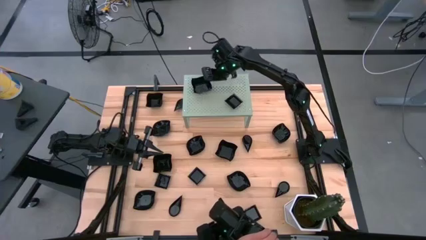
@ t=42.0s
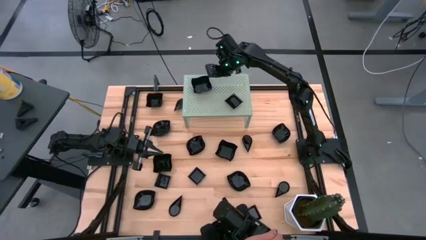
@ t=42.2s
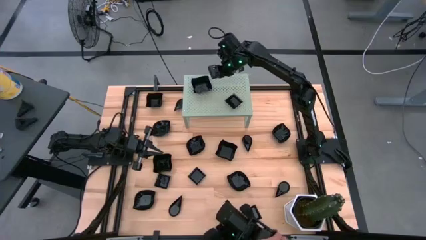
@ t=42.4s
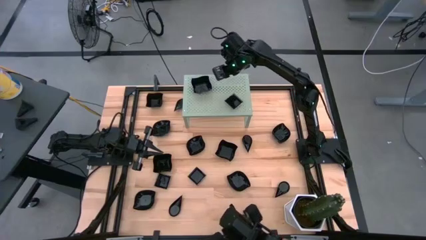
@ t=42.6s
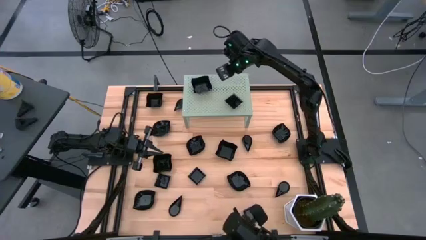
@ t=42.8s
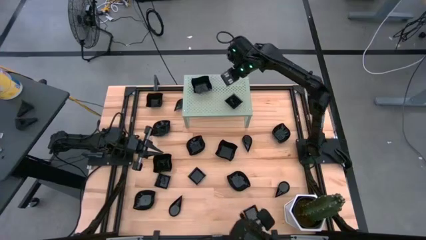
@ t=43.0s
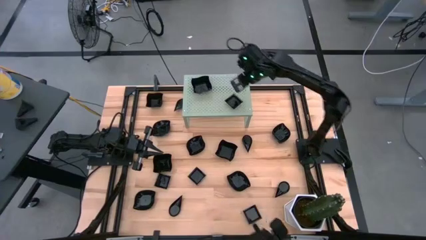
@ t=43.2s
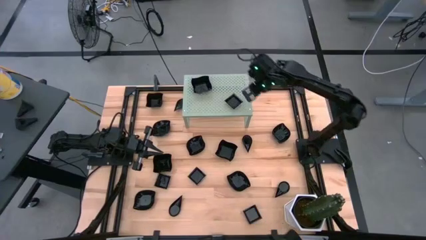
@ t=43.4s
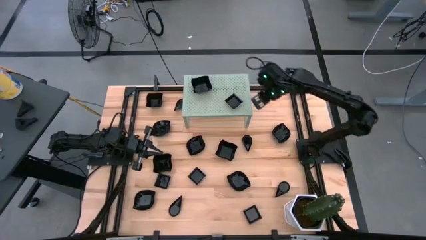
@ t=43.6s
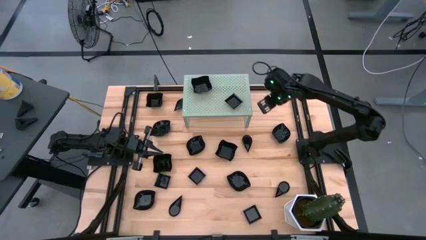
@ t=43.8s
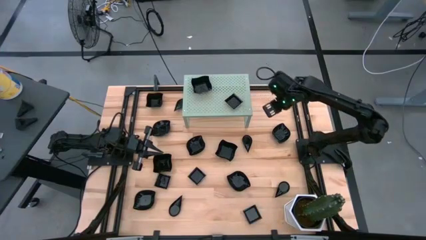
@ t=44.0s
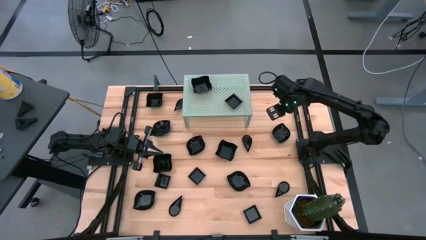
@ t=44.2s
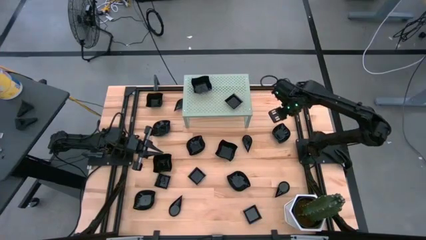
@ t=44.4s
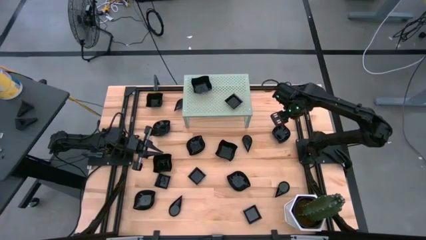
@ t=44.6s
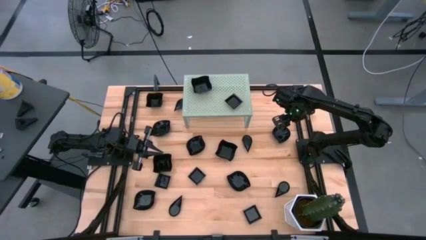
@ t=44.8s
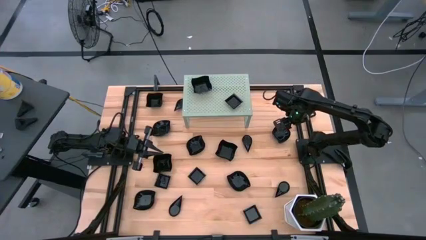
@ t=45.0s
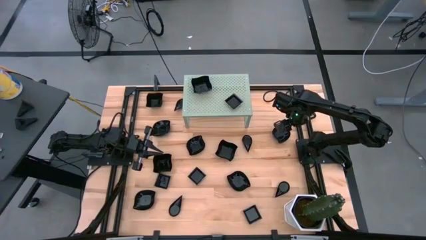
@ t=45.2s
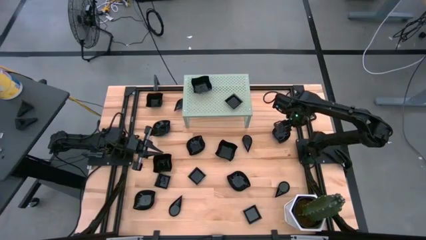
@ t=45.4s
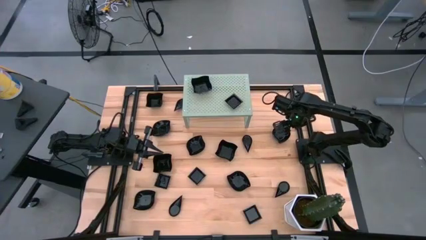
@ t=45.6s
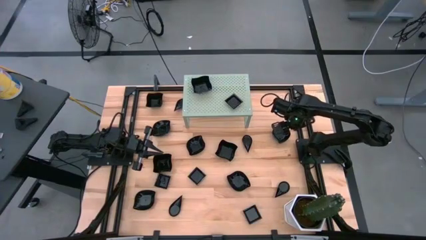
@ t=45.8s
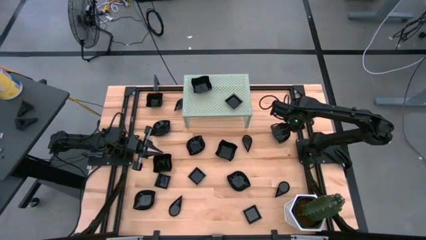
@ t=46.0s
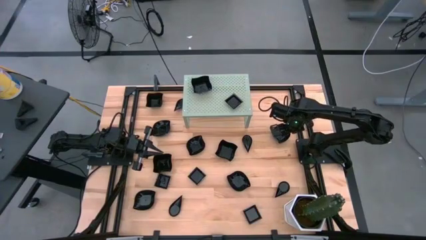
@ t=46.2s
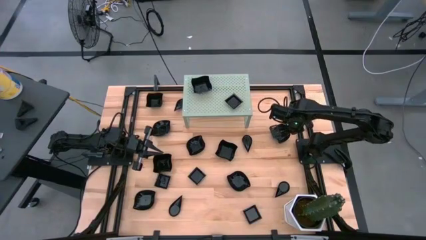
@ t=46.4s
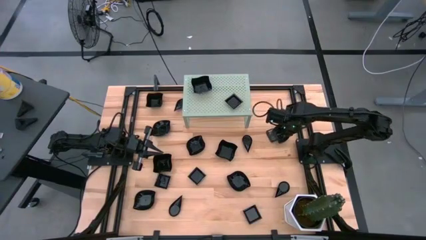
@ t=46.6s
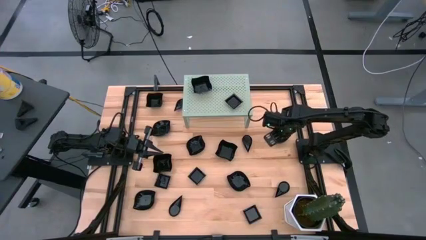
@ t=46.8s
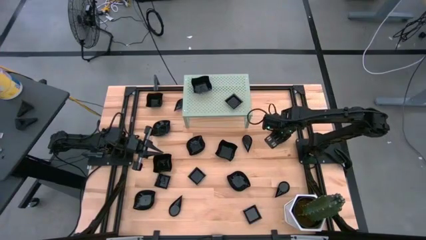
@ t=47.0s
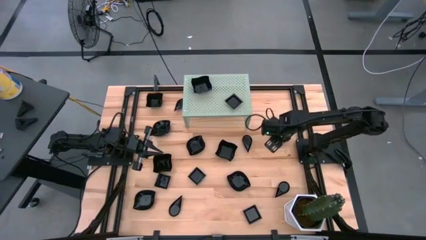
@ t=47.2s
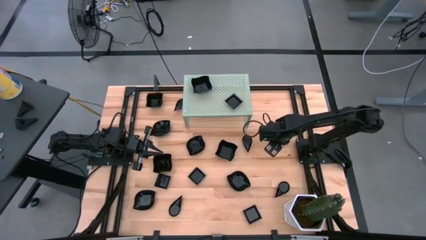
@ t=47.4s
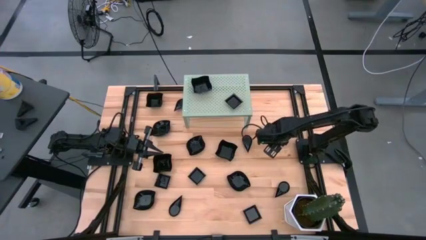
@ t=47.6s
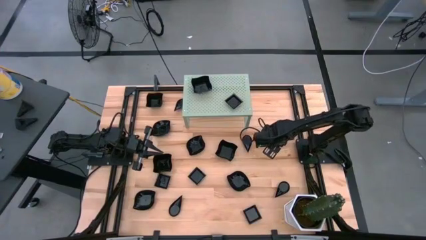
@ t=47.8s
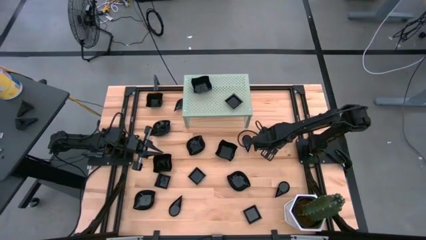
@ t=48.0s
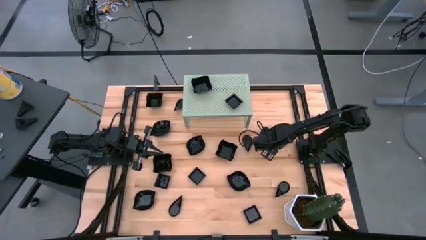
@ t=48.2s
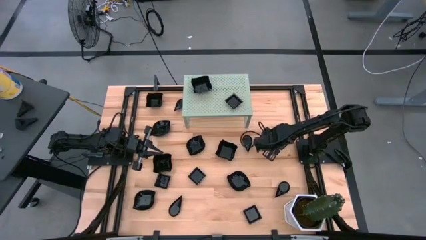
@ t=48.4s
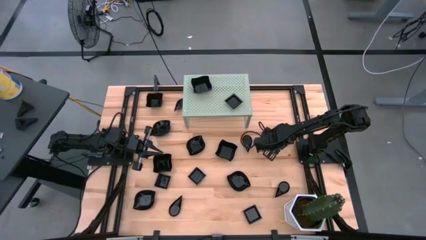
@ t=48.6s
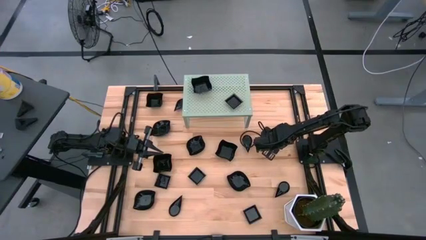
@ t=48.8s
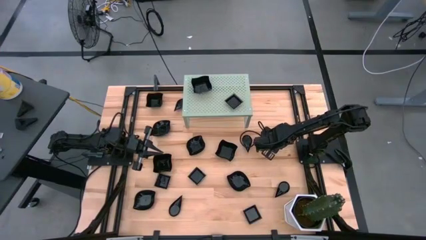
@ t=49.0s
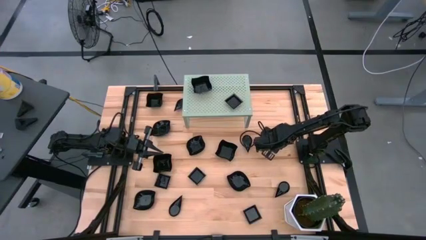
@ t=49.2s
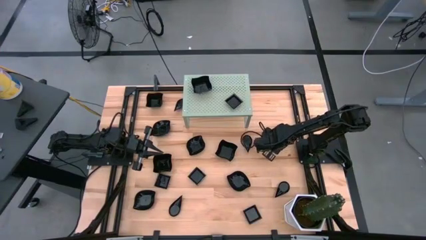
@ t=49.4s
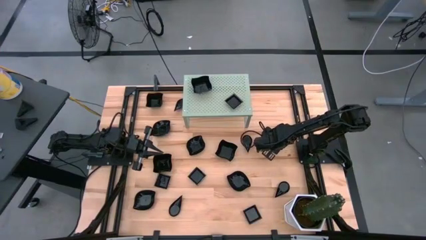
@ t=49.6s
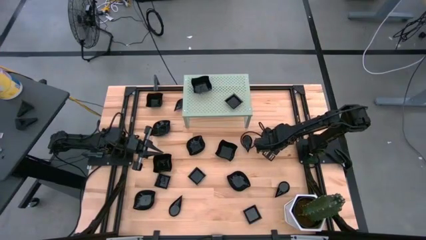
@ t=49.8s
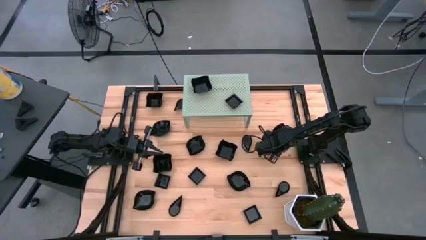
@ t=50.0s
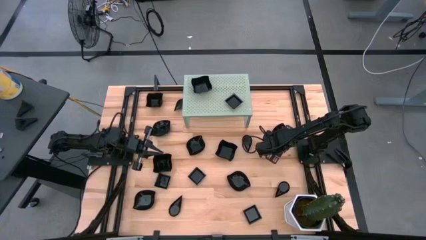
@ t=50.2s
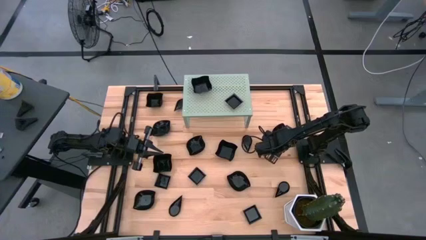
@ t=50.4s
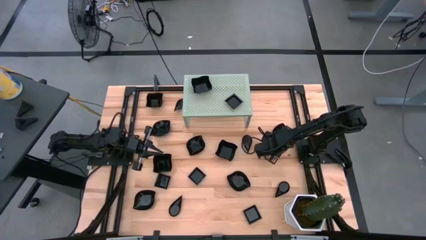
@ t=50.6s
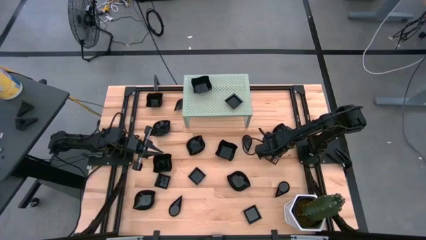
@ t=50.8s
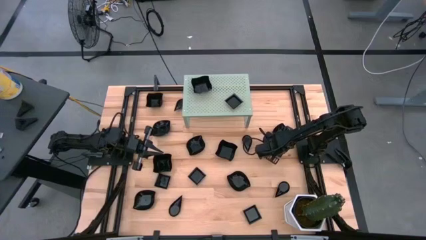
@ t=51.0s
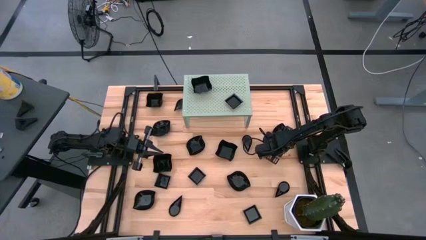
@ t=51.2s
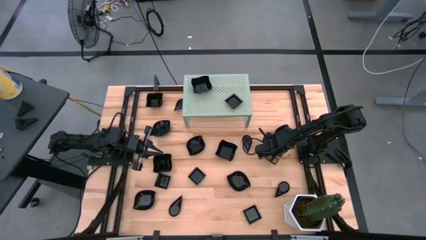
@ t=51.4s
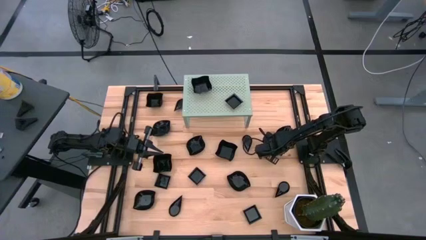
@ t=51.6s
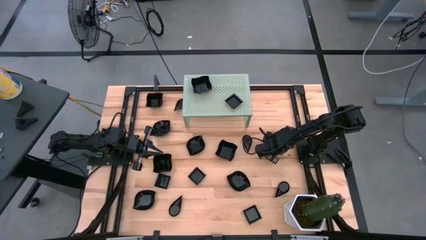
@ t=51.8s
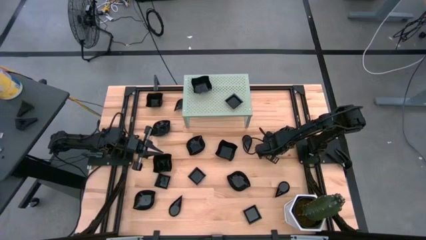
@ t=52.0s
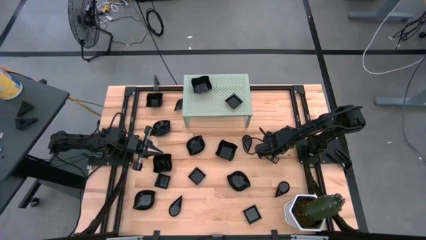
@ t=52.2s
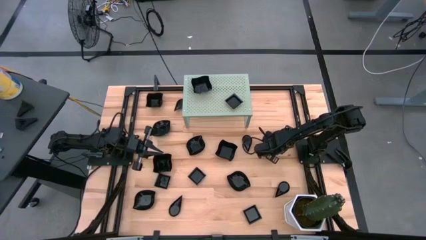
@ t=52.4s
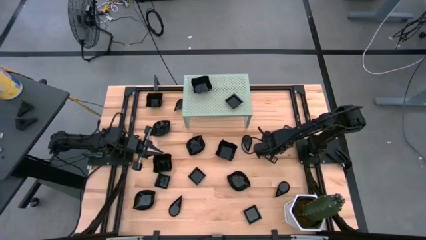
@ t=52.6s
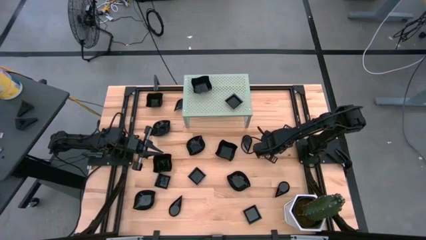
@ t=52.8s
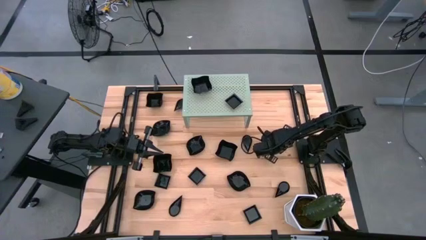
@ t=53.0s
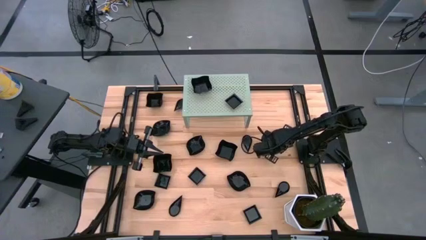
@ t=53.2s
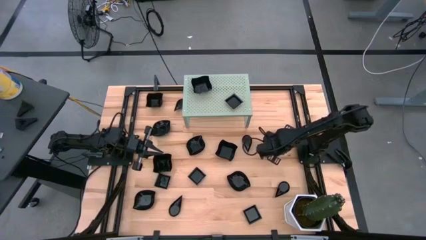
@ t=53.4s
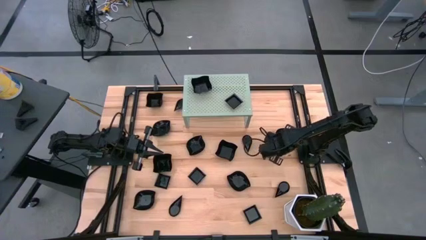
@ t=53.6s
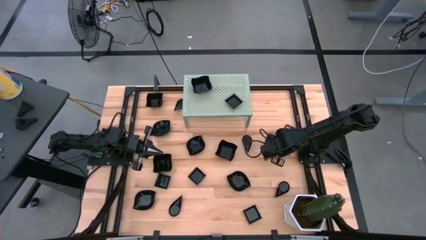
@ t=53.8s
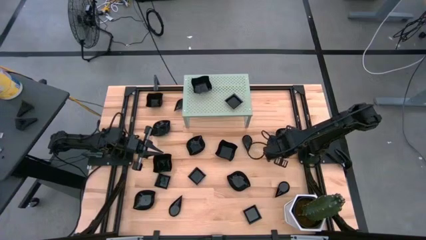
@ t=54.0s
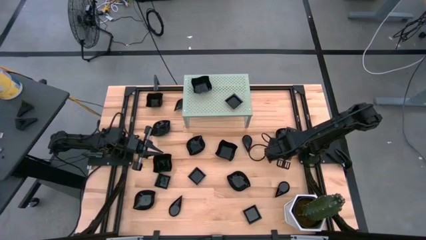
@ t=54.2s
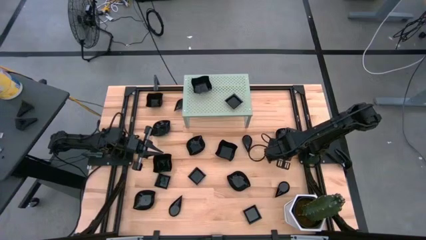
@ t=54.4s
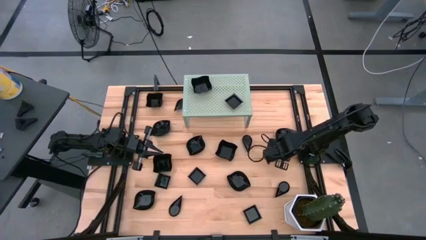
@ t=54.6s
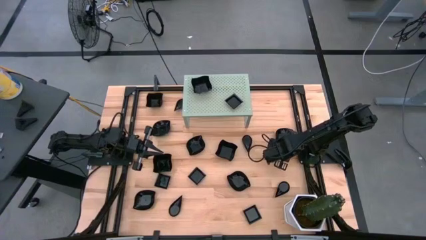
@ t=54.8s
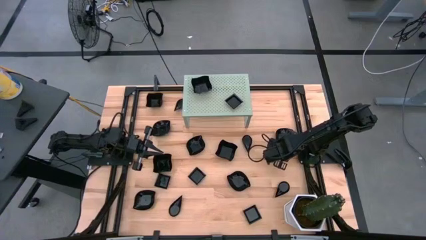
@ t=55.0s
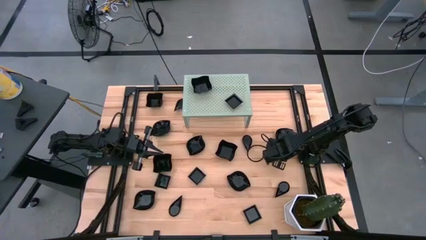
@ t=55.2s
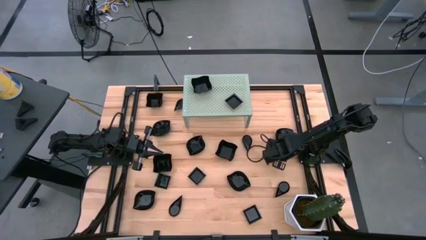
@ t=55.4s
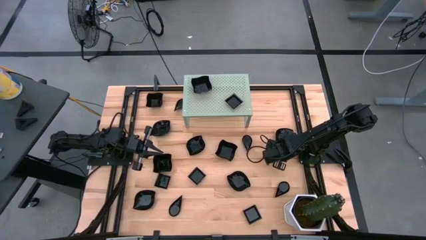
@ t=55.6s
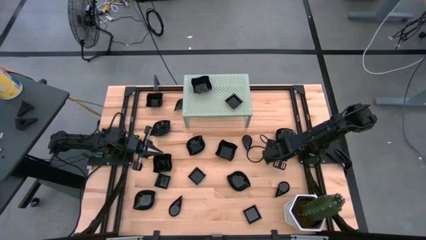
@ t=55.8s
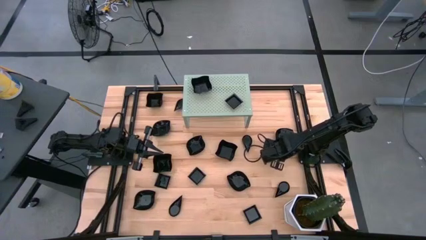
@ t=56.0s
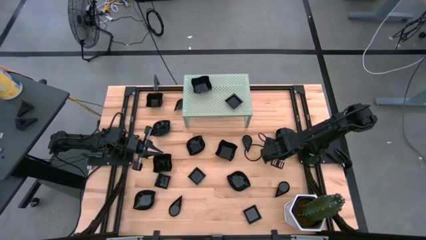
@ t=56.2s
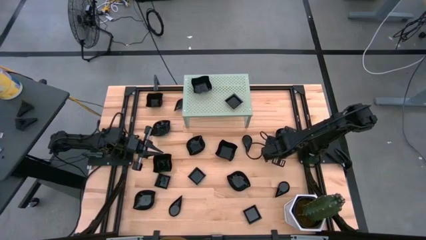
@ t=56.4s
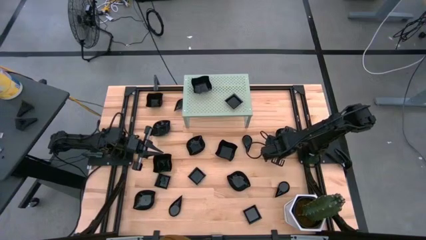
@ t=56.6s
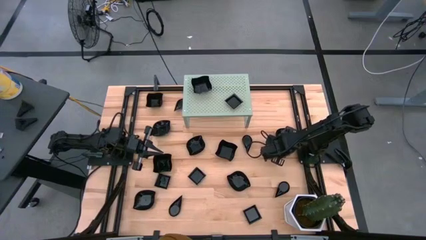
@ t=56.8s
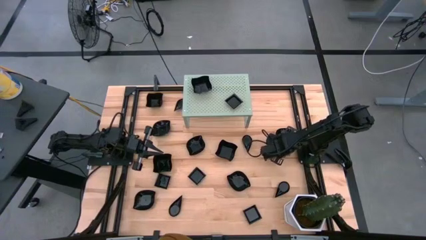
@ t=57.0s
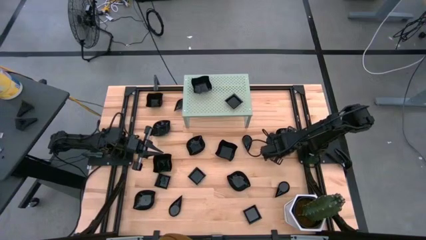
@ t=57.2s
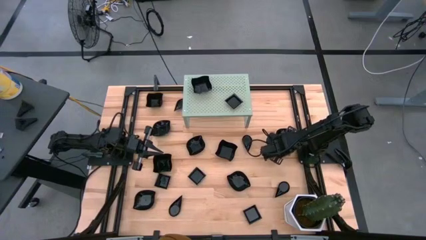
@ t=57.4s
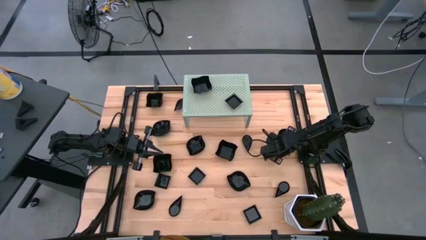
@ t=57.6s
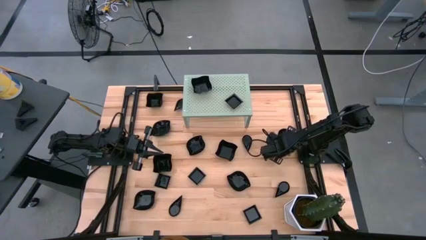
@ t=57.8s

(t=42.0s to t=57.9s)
Task: Pick & Place Mini shaped plates
Put the leaf shaped plate on the shelf
